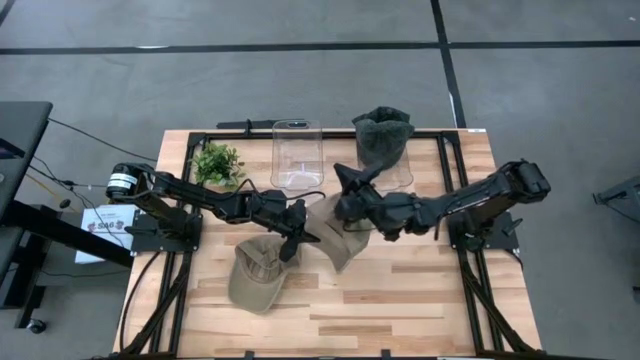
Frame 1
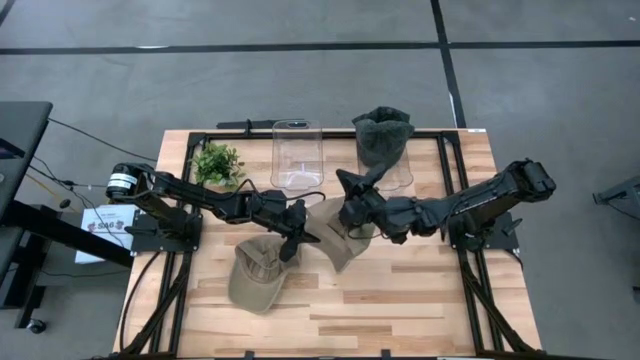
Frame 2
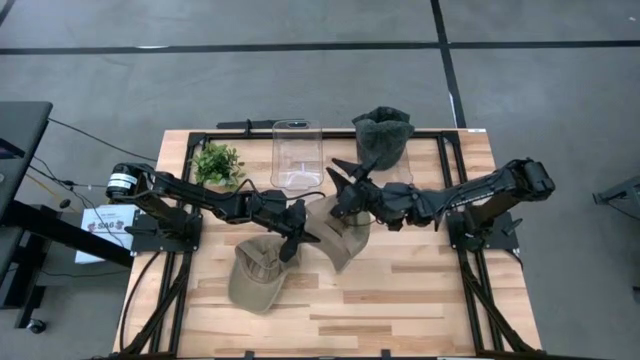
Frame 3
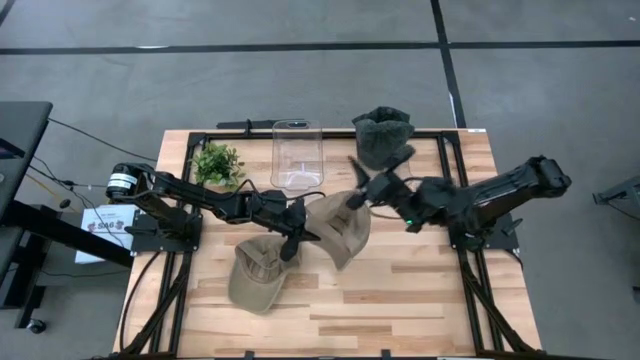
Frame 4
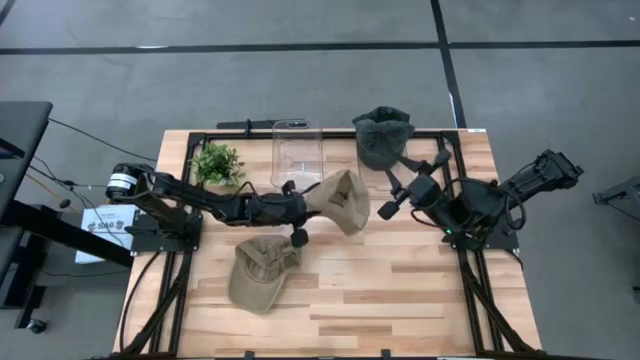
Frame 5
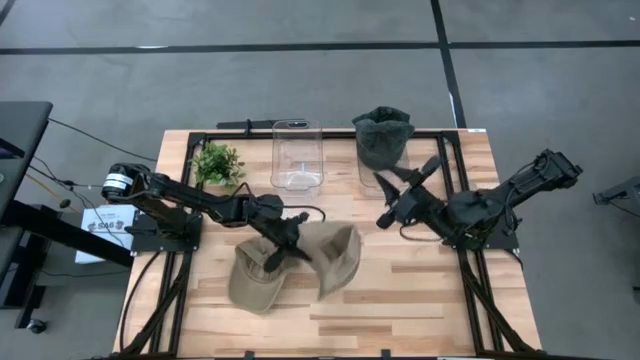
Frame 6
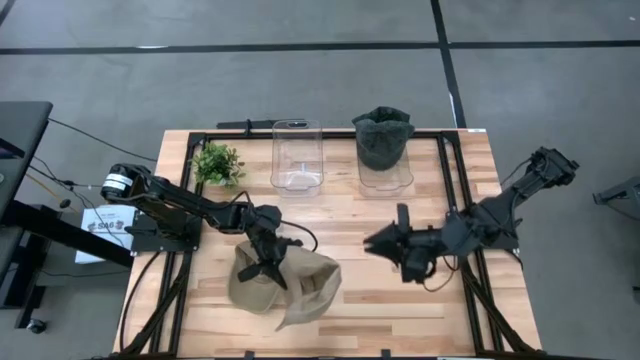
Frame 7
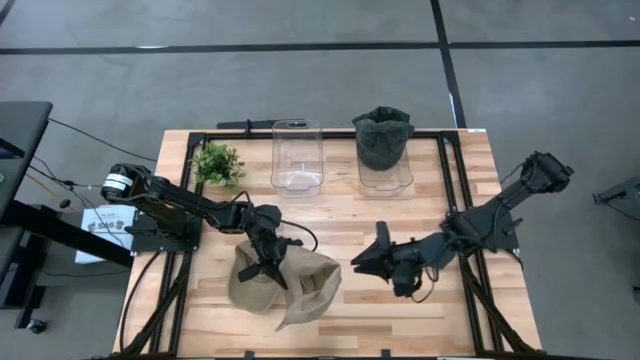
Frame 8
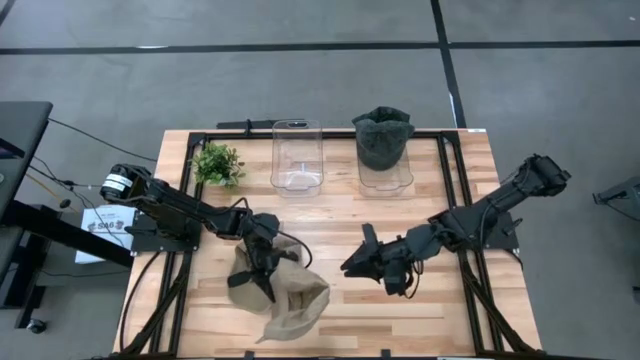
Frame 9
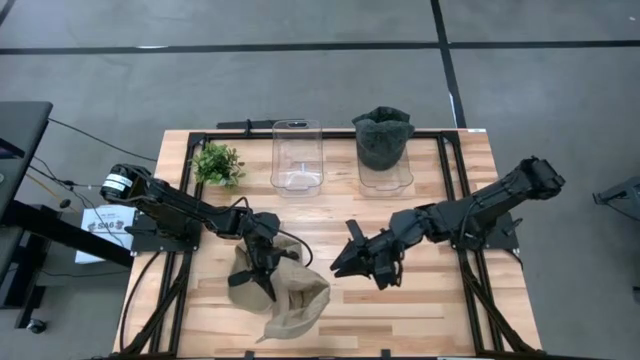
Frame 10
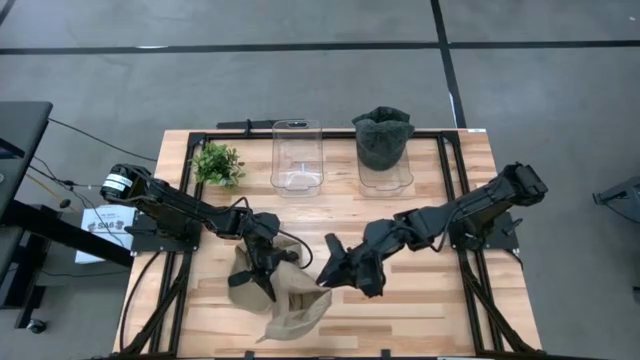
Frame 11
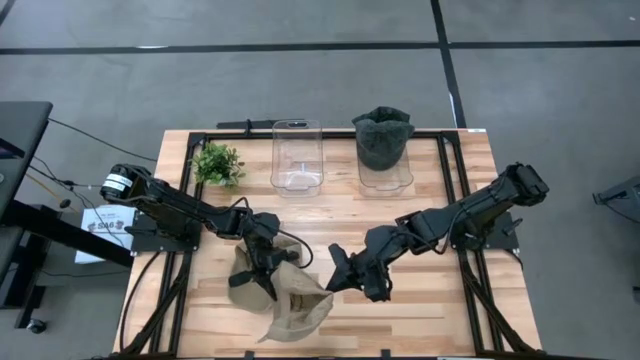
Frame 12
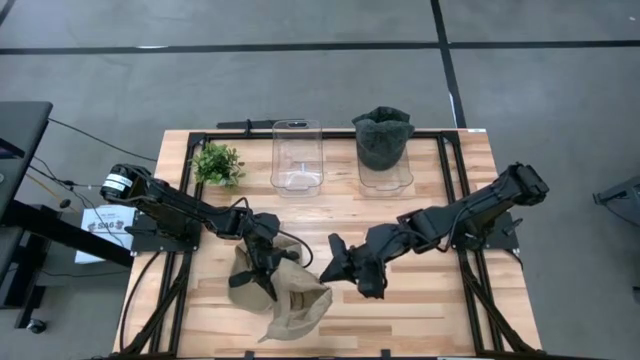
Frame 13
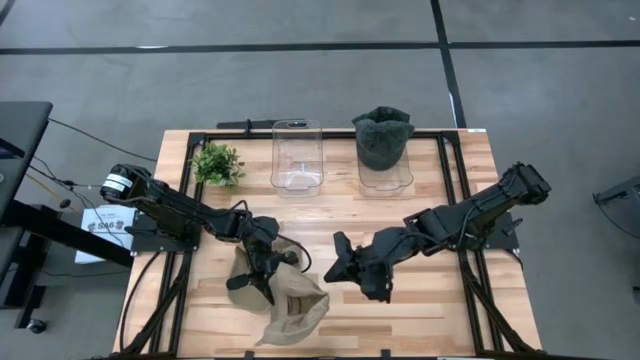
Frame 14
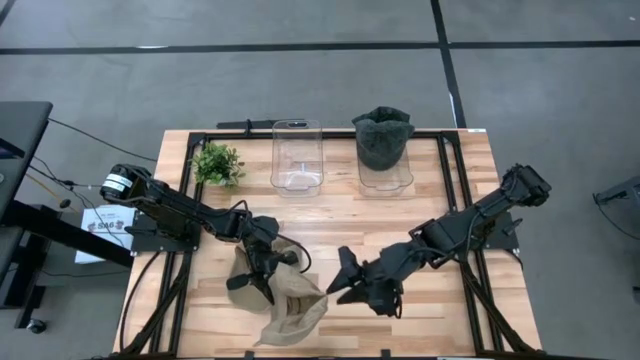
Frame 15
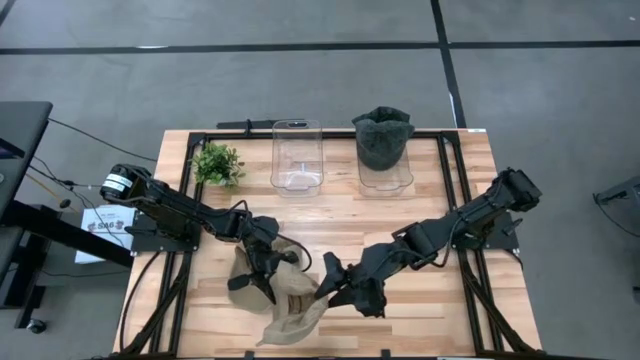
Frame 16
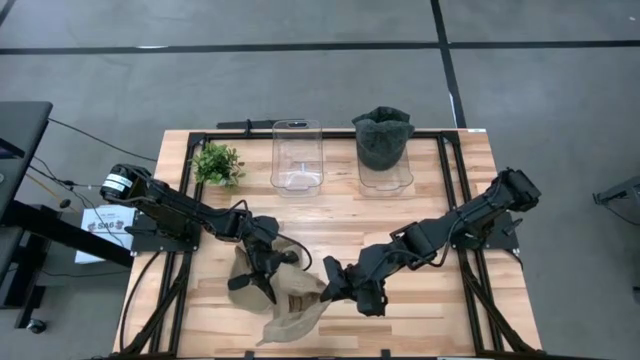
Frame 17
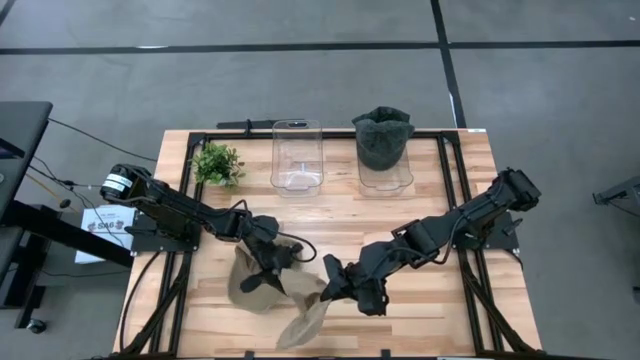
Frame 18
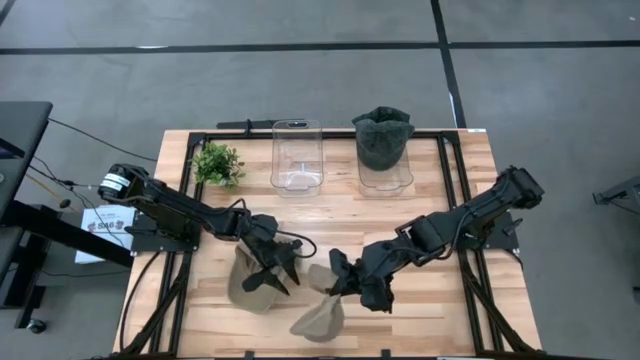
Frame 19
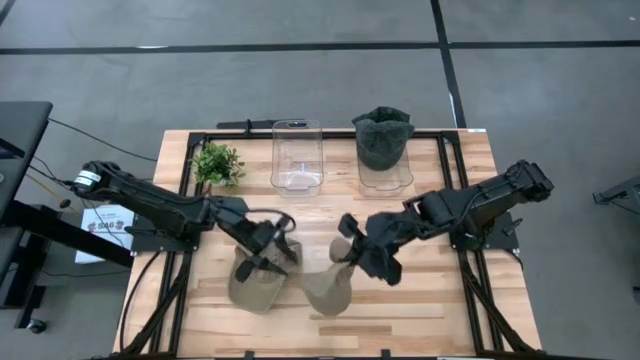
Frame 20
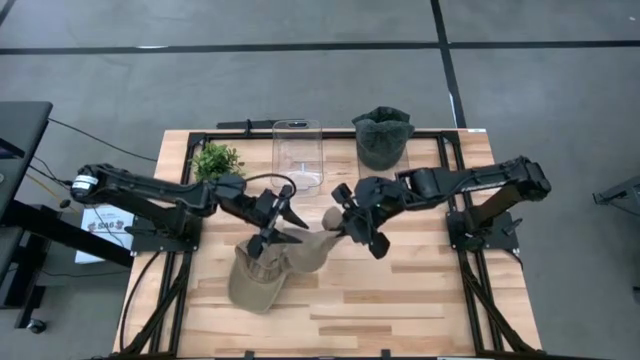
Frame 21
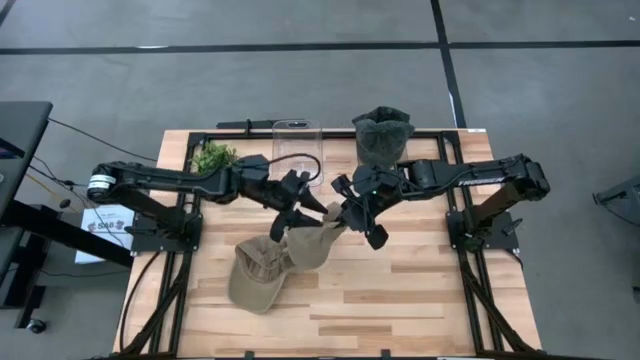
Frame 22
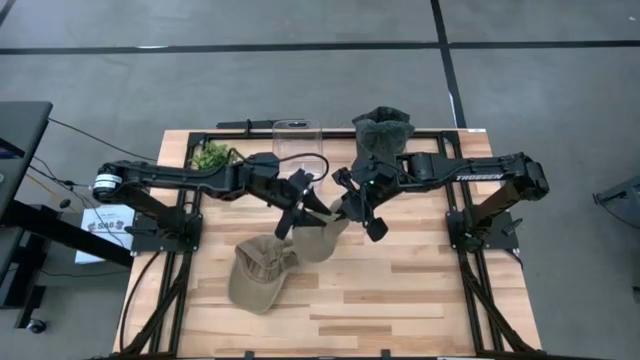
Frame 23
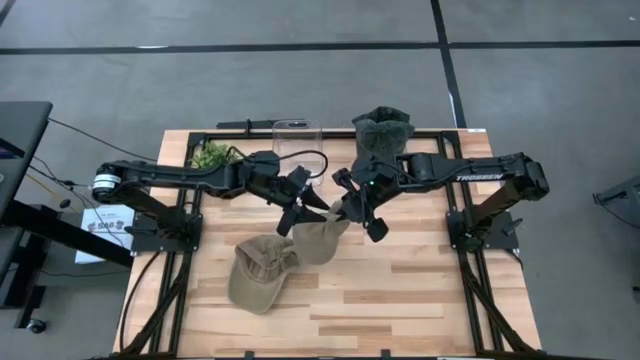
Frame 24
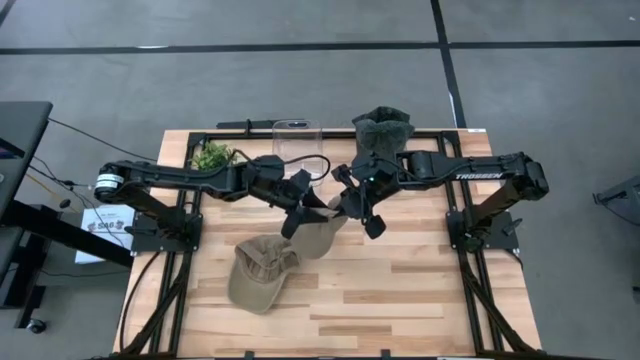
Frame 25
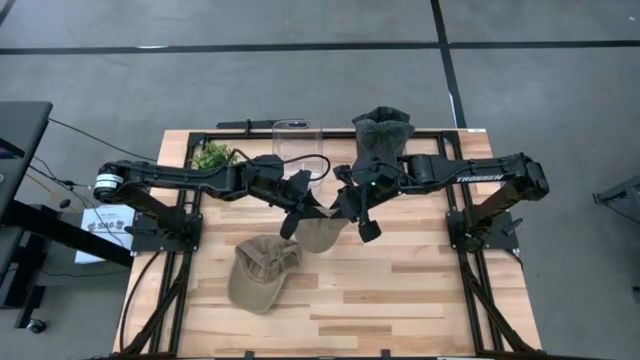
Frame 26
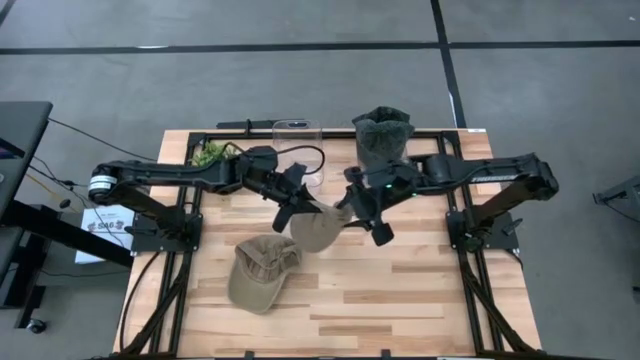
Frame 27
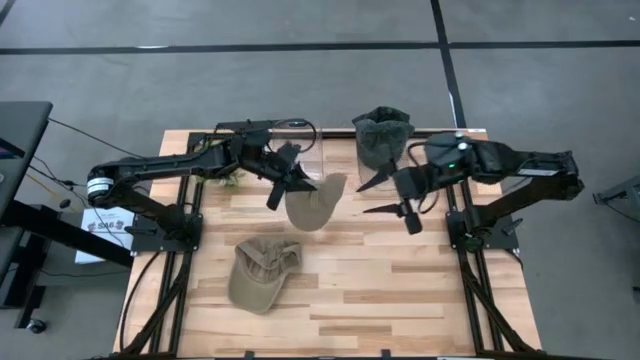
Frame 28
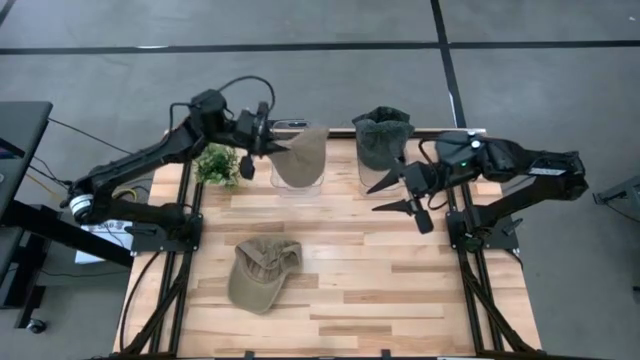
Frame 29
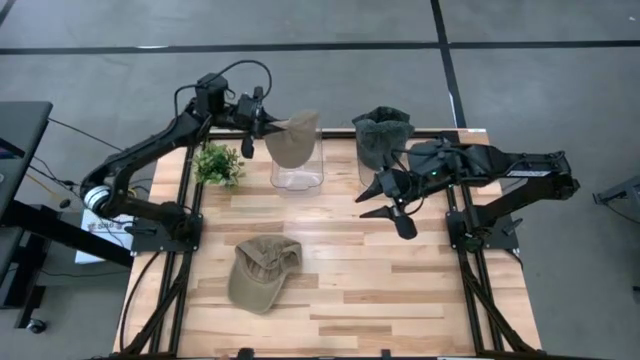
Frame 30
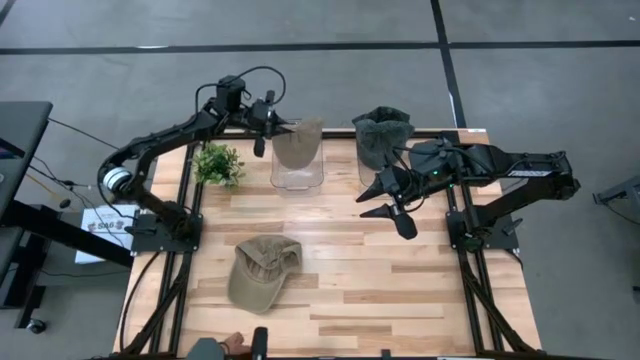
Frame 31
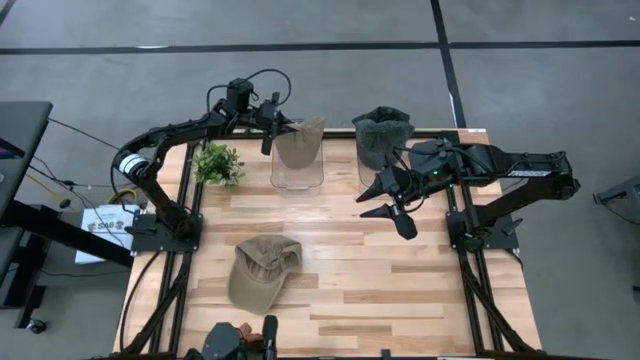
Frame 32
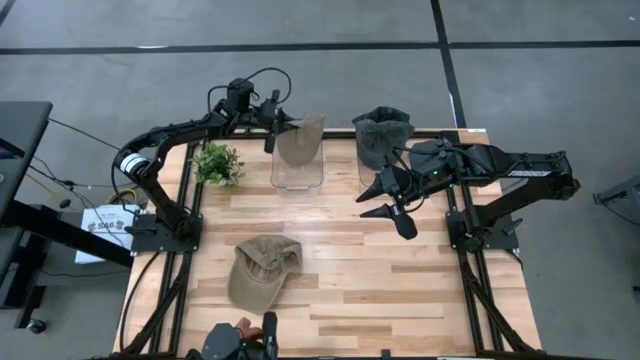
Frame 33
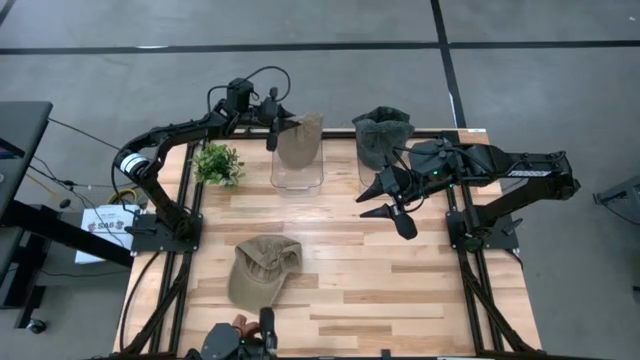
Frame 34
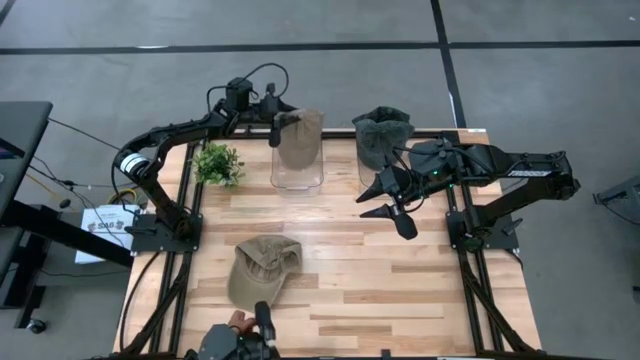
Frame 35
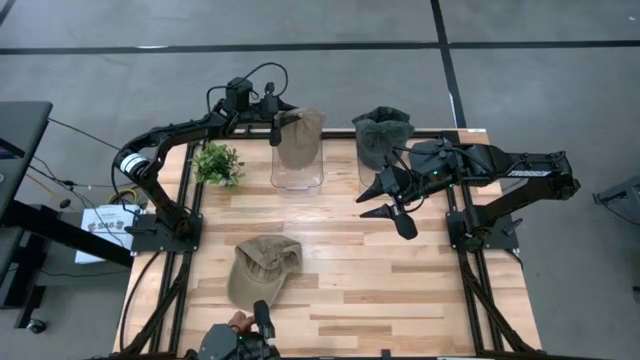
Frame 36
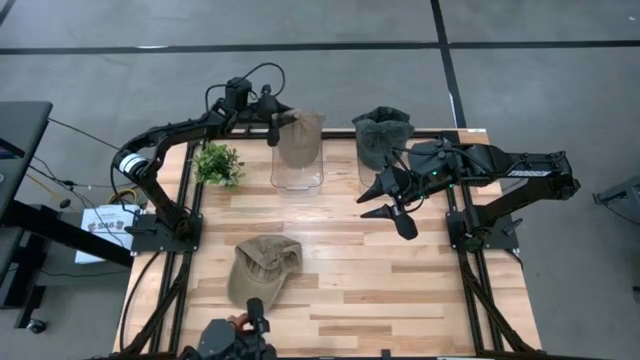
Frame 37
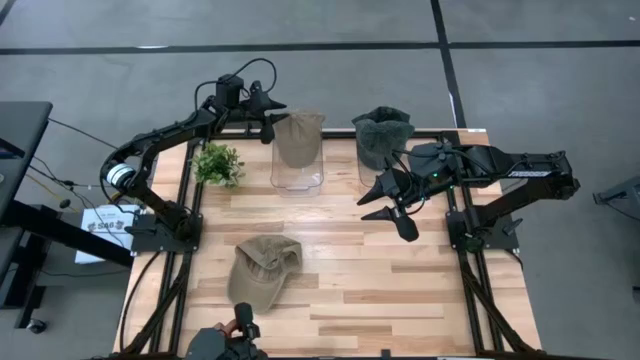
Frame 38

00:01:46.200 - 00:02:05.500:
Task: Pick & Place hat
Put the right brown cap into the left transparent bin

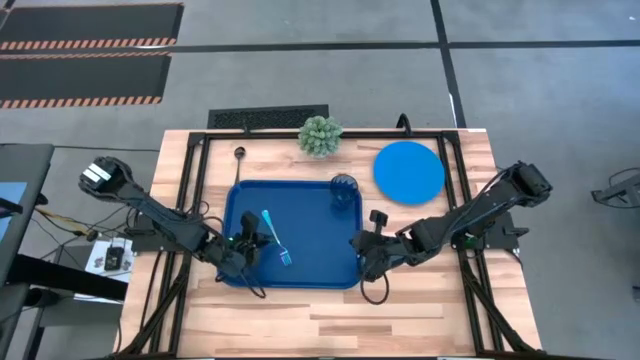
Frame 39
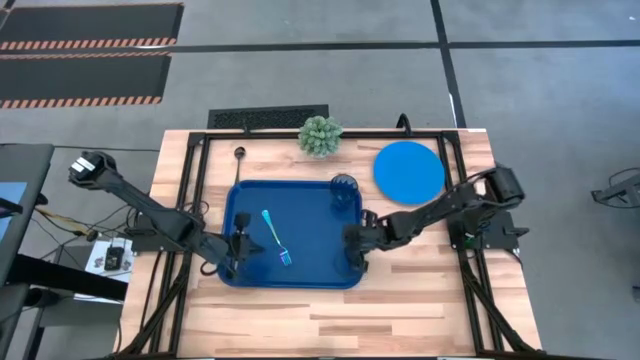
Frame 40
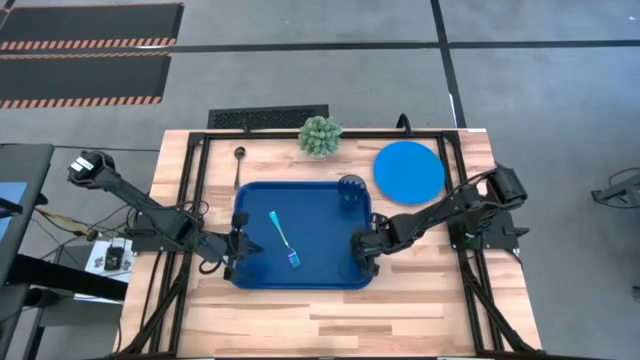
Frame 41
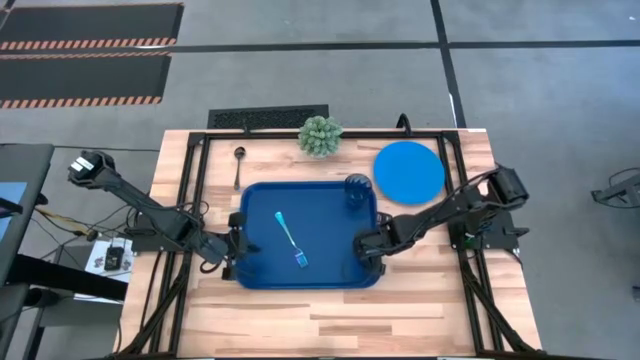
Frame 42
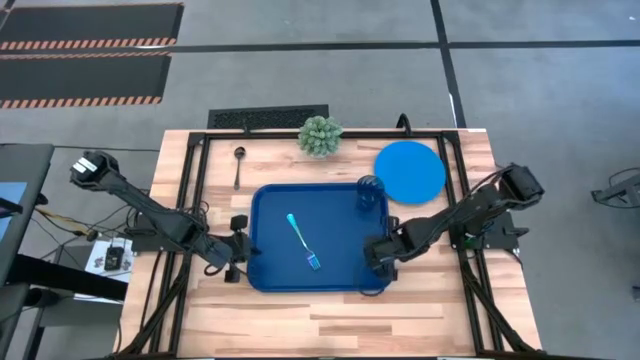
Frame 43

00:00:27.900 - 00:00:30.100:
Task: Pick and place plate/cup/fork/spoon on tray
Adjust the blue serving tray
